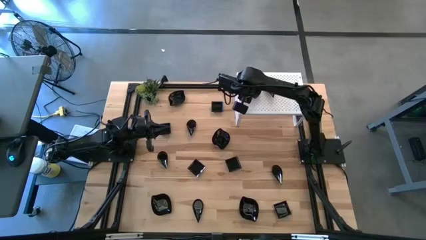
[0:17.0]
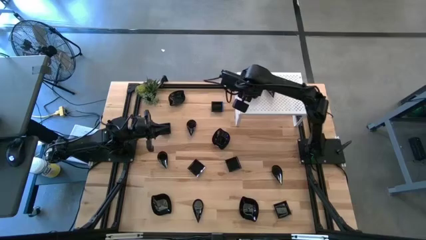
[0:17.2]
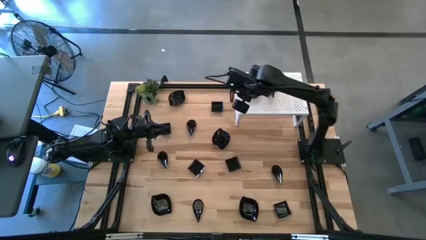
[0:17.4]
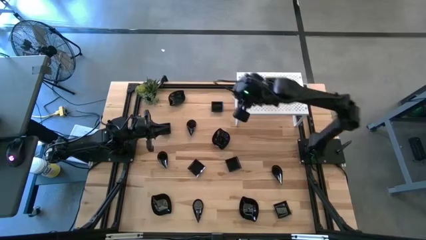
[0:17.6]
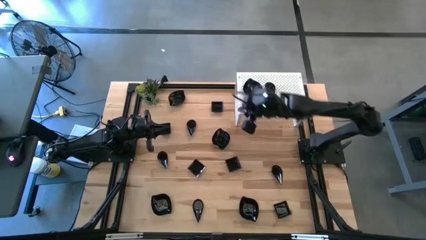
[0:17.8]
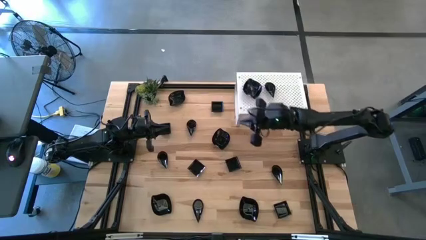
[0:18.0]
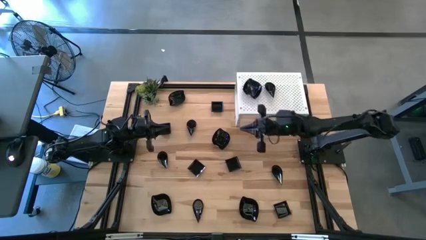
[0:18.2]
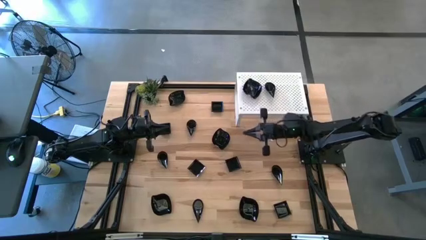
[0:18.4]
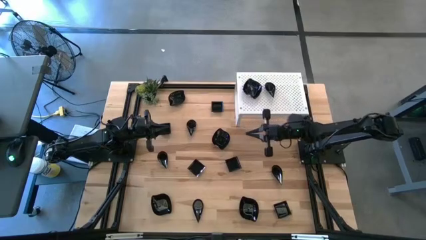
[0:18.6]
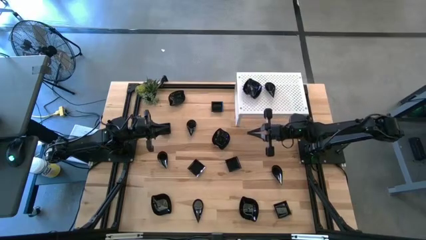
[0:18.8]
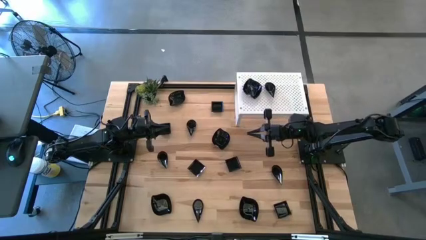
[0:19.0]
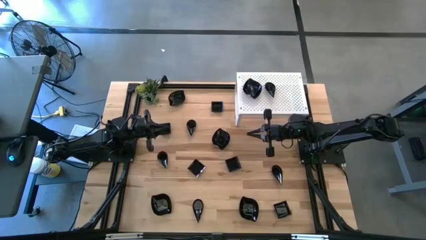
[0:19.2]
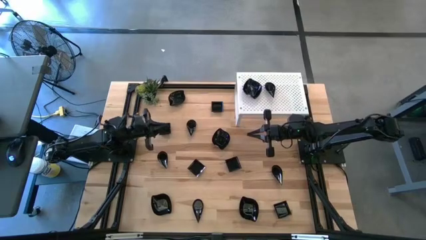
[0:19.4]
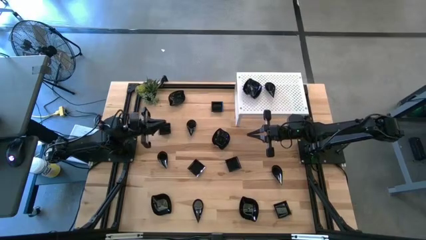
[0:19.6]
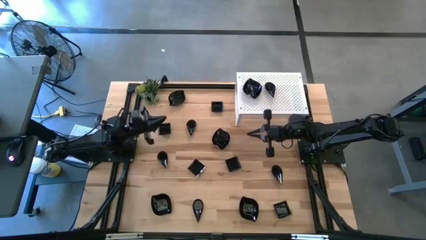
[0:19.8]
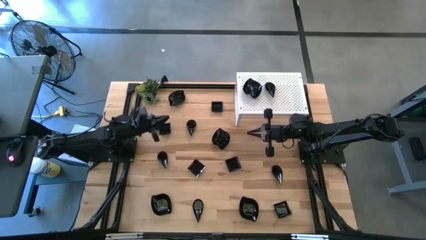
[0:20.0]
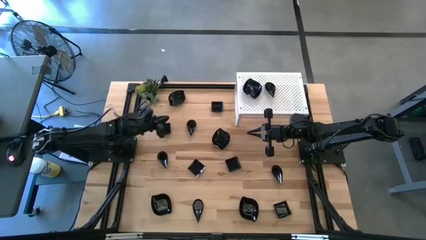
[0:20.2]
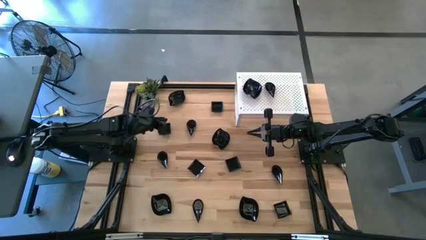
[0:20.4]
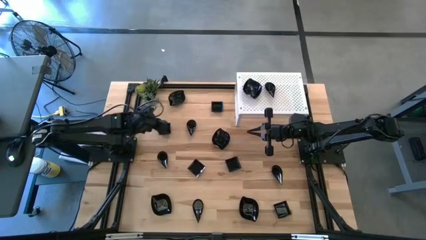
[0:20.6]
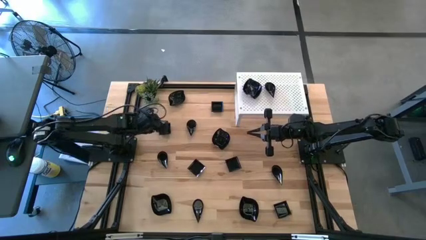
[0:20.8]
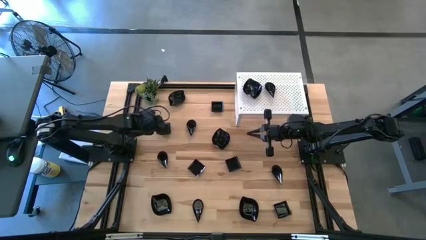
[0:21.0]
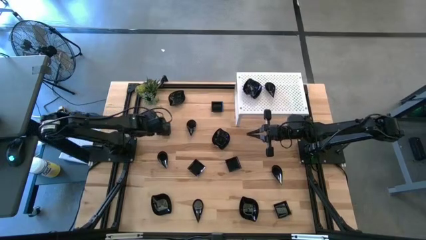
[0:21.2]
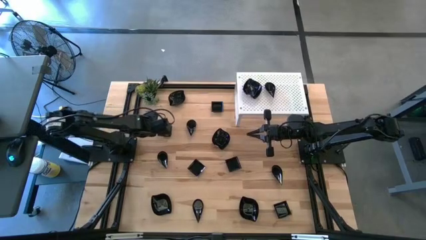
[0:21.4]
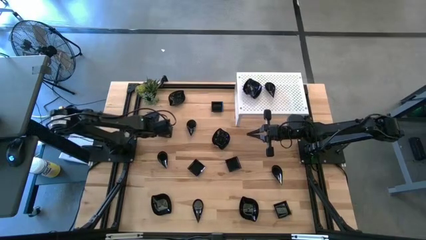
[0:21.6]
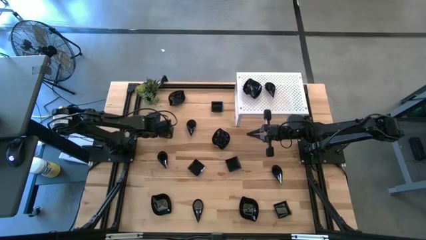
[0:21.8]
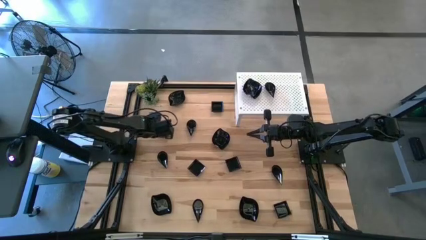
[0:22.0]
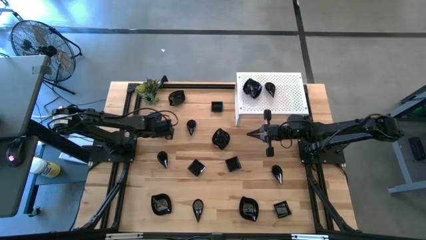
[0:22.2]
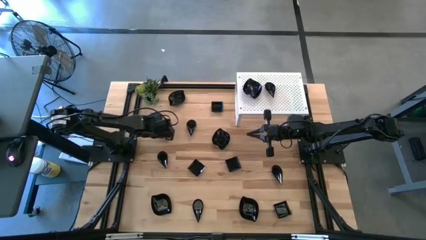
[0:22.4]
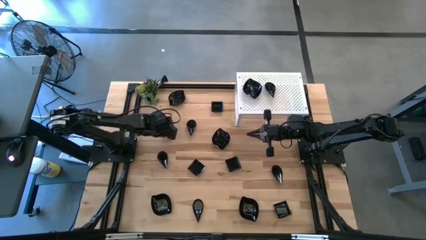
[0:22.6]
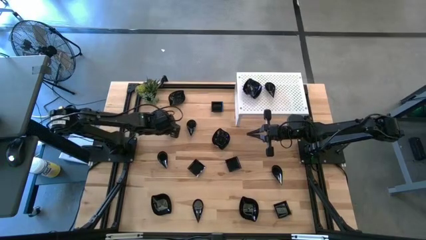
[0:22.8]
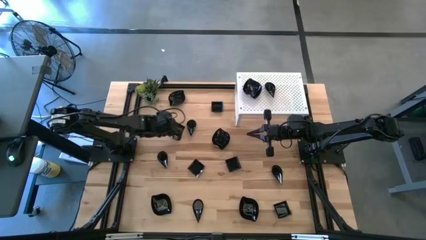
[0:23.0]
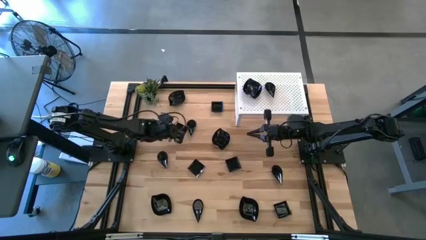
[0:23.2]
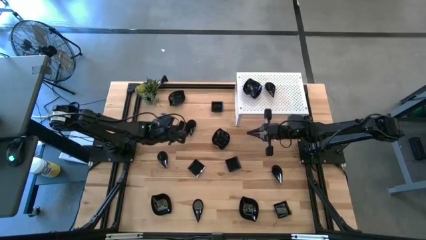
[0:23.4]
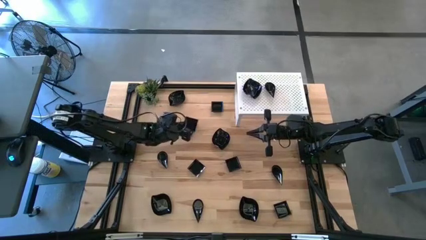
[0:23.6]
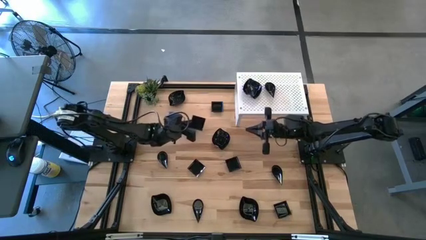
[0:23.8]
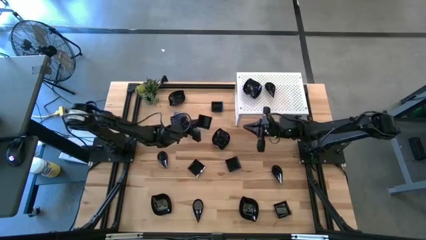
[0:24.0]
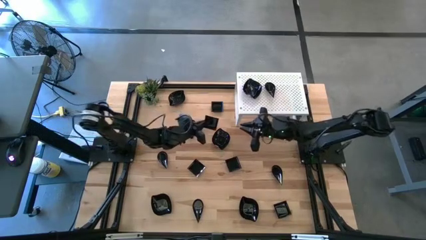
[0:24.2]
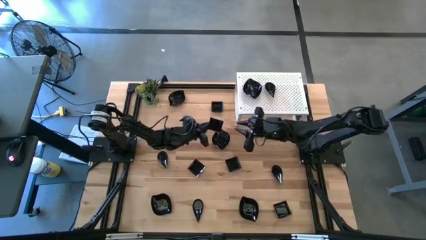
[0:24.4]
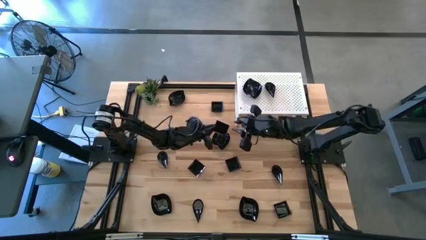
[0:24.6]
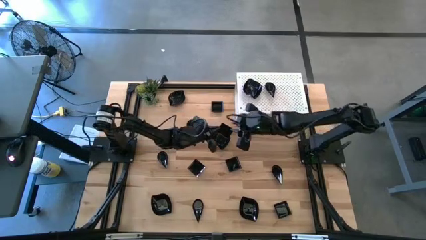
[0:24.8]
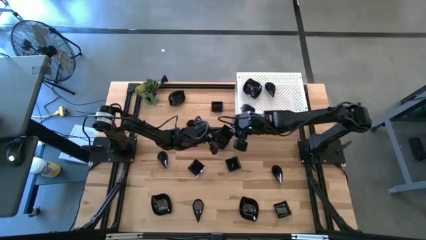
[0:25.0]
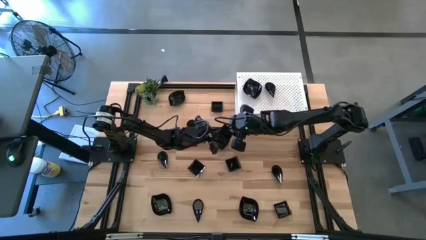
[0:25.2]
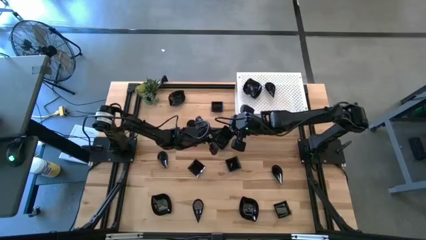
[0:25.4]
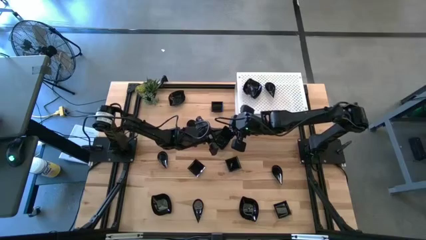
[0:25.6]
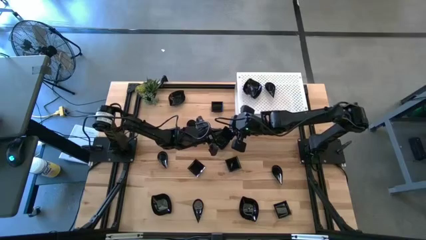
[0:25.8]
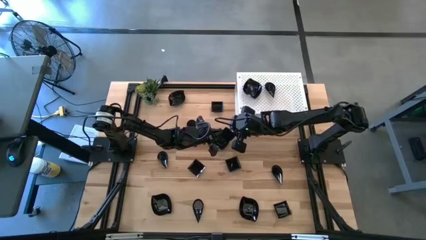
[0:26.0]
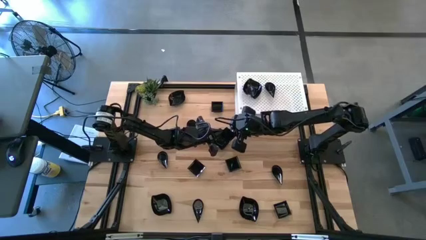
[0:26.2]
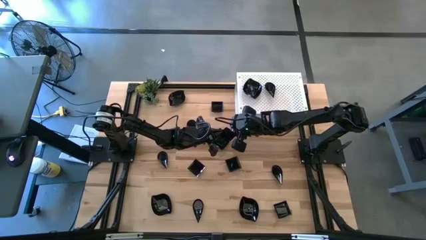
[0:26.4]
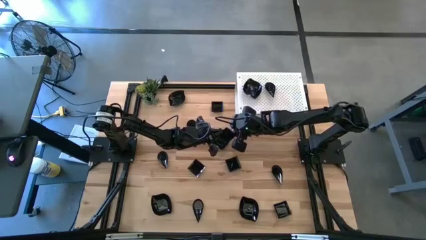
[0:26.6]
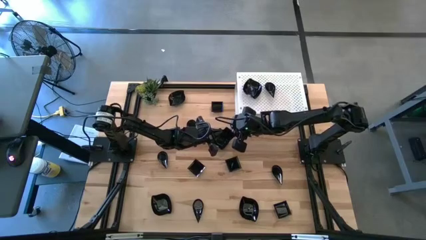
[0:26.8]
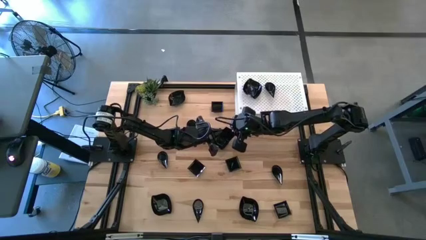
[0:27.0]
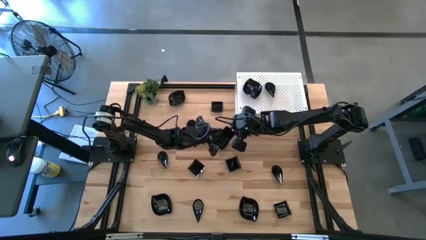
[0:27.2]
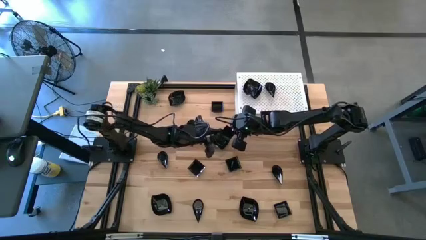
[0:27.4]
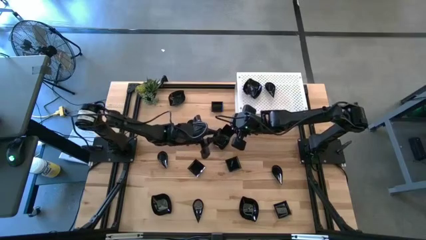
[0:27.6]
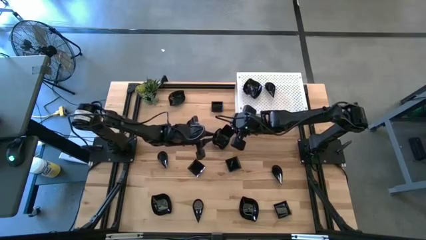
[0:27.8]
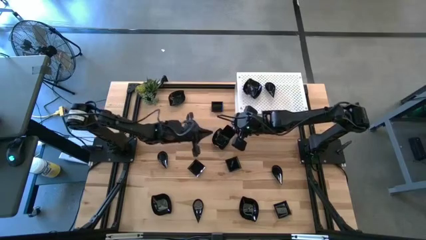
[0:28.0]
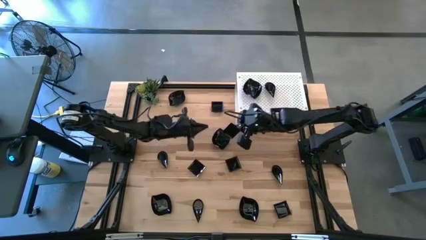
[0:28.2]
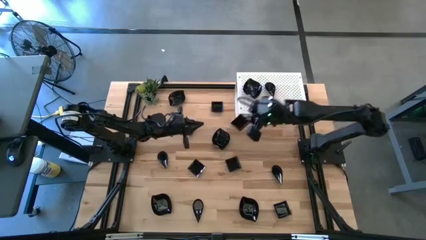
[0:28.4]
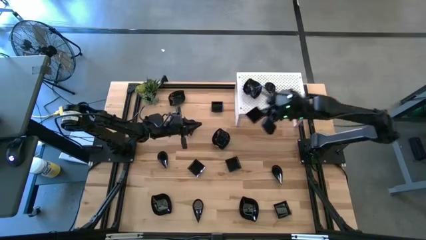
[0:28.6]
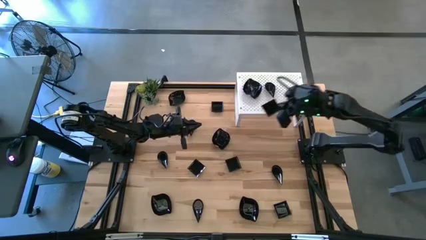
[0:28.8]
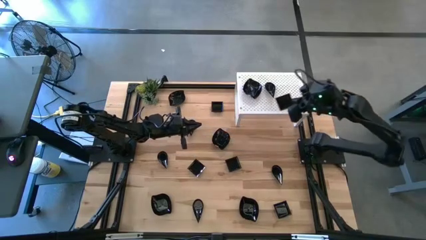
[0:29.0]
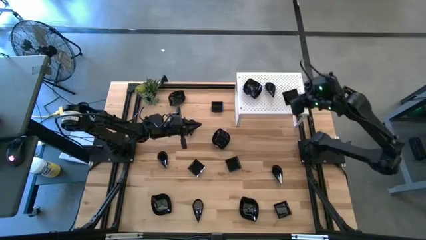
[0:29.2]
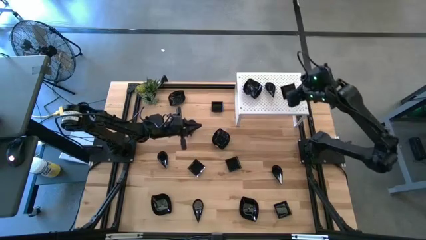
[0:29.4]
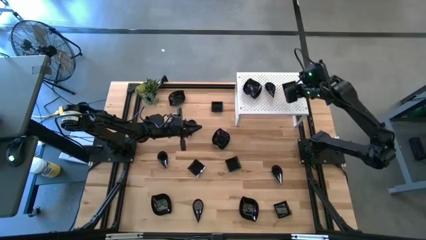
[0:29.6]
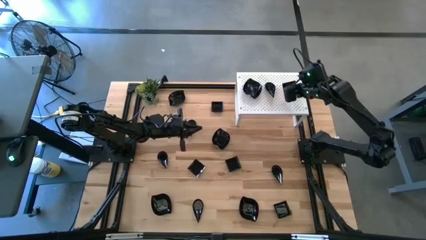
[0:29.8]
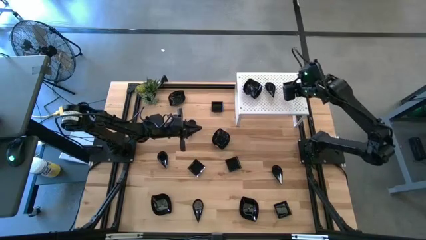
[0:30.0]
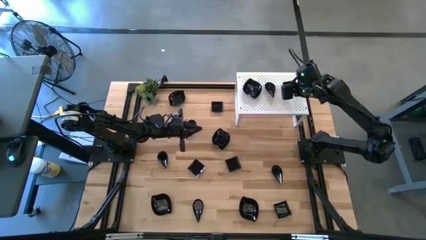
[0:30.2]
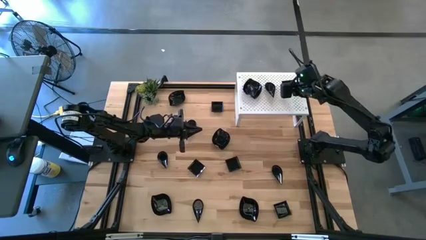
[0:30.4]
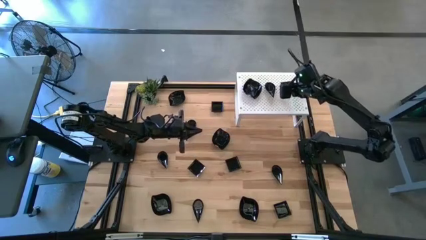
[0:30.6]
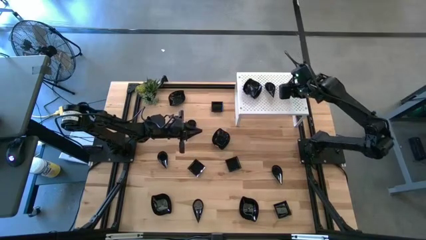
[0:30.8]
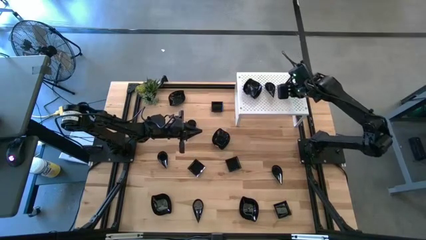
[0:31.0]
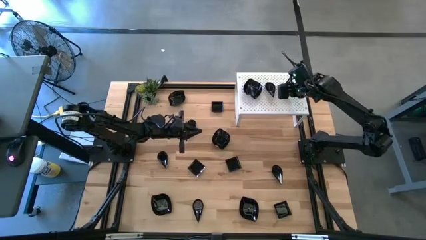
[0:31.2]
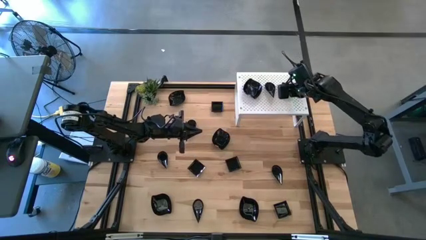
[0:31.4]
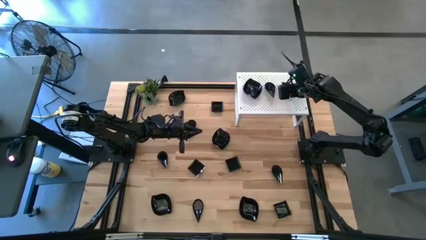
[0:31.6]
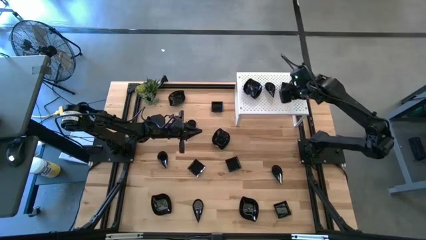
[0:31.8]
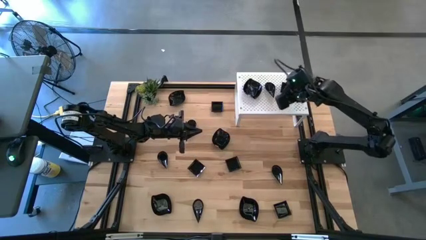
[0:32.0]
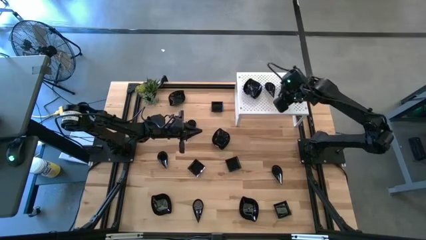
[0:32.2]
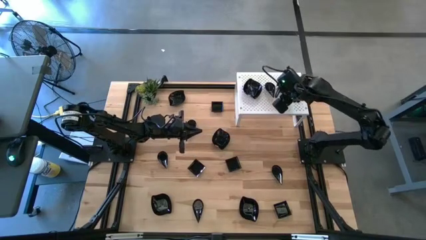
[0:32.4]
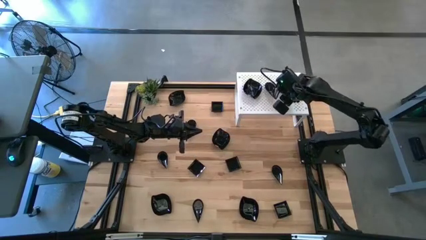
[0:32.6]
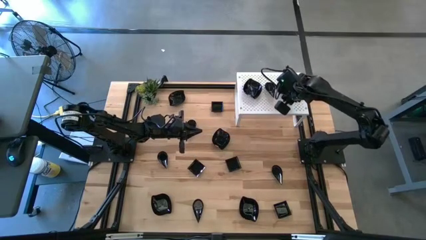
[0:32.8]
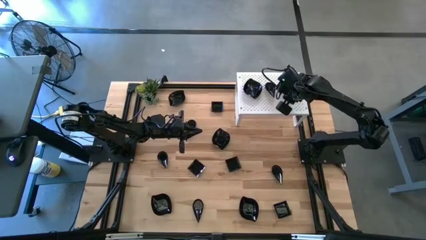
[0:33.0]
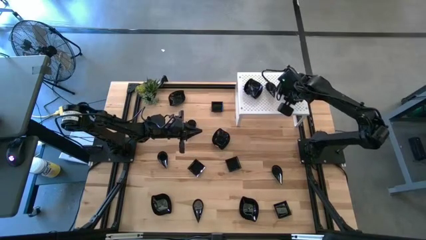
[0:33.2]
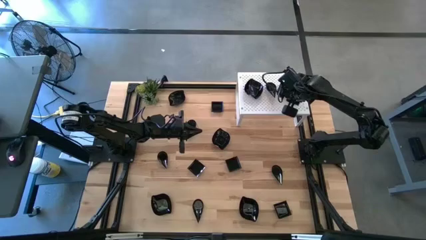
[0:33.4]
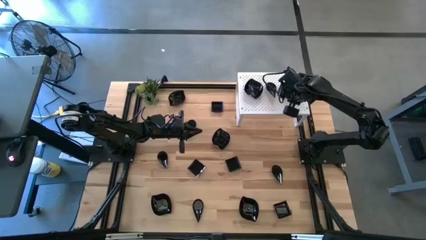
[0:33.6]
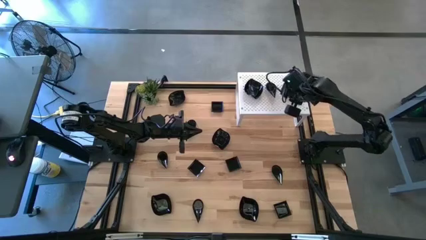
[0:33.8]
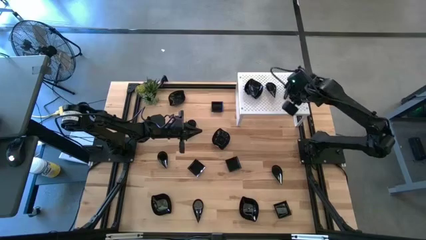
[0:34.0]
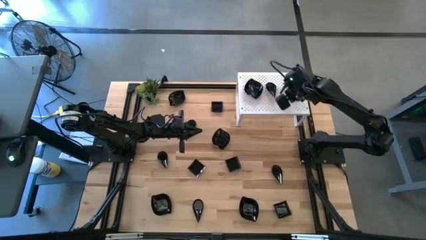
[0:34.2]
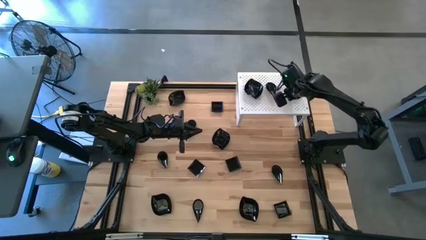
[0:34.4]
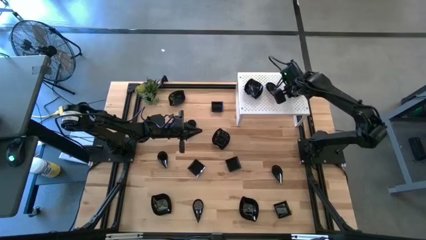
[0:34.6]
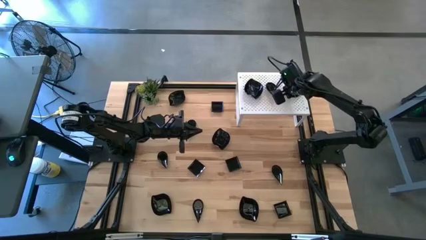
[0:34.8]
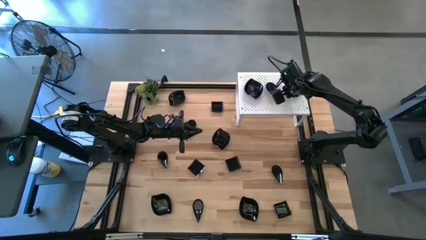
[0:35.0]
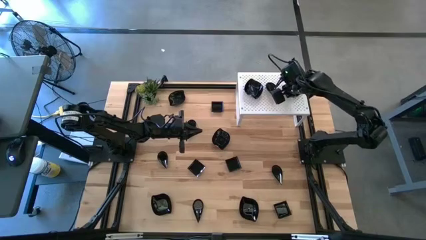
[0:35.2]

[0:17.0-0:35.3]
Task: Pick & Place Mini shaped plates
Put the black square plate on the shelf
